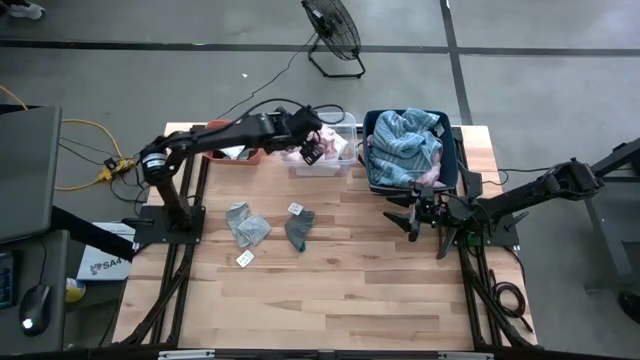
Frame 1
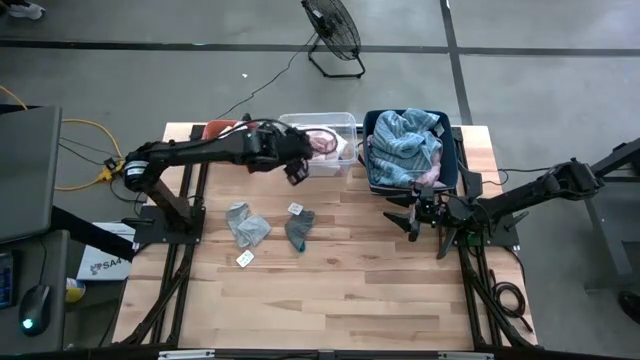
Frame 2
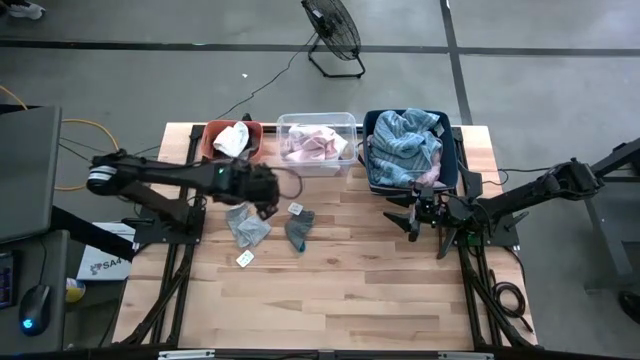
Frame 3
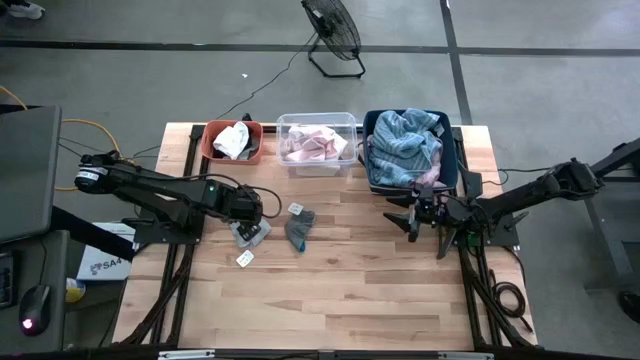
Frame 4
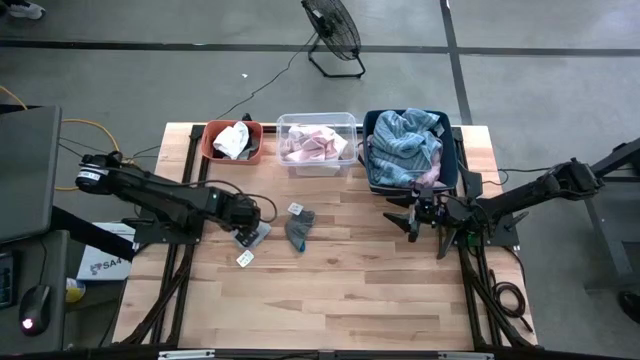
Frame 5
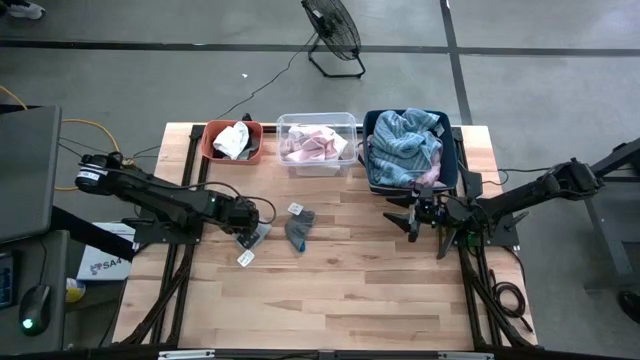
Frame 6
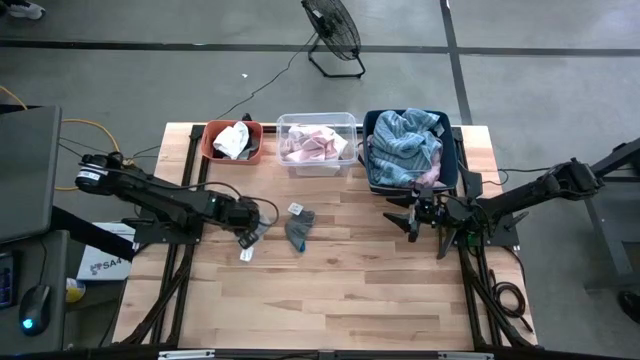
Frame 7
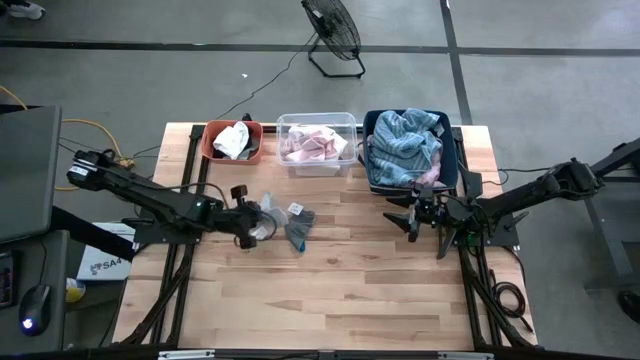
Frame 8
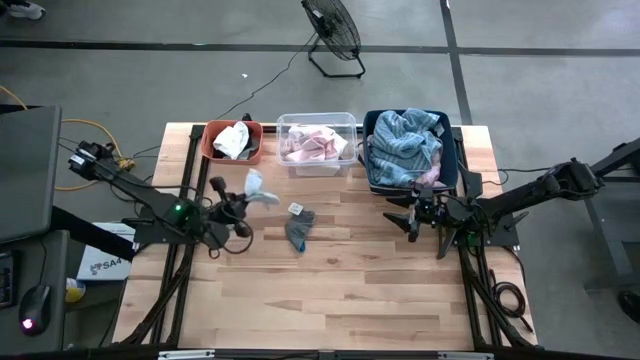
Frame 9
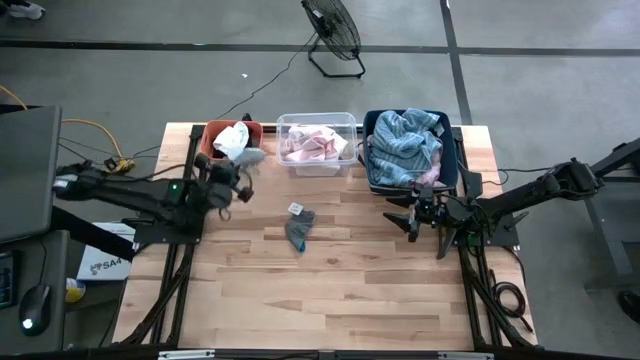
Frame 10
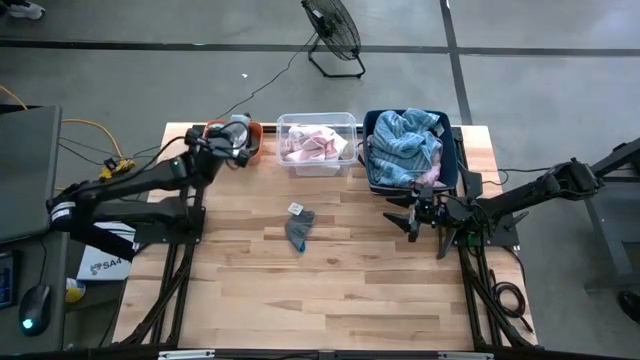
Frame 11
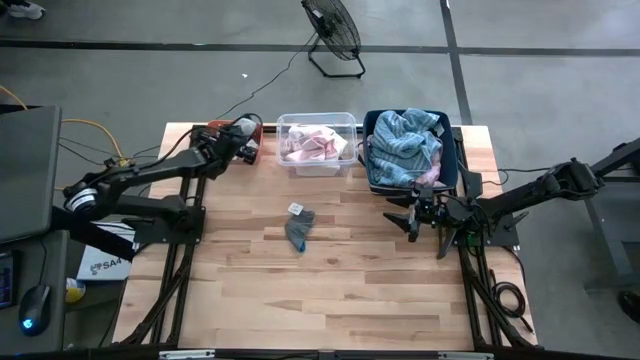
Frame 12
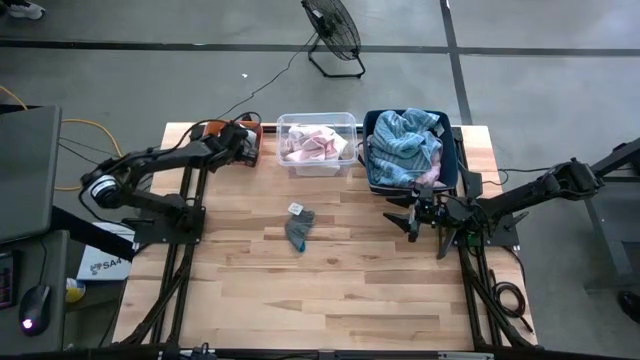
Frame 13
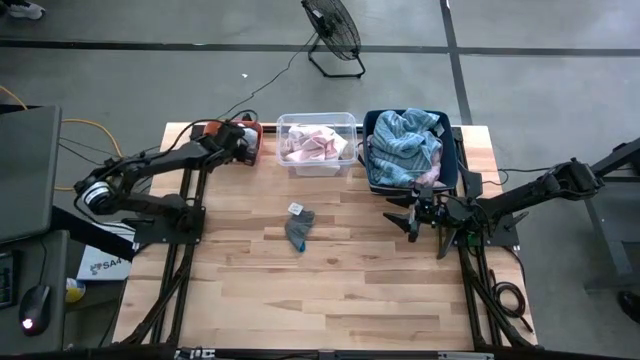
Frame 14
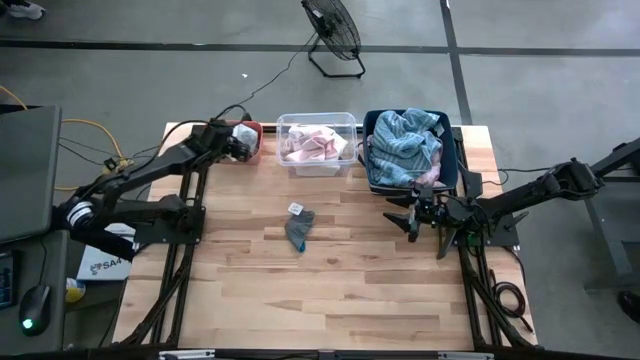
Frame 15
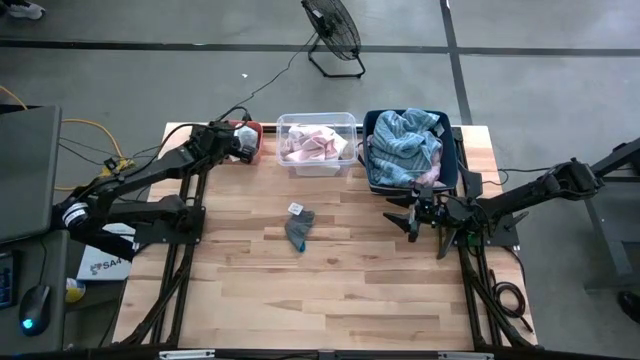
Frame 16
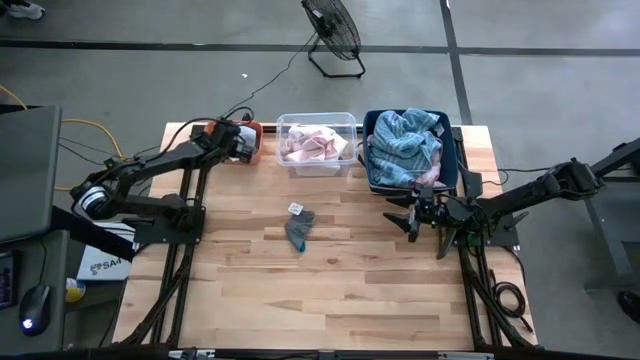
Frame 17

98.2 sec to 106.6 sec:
Task: Pick & Place Cloths
Put the light gray sock into the orange bin

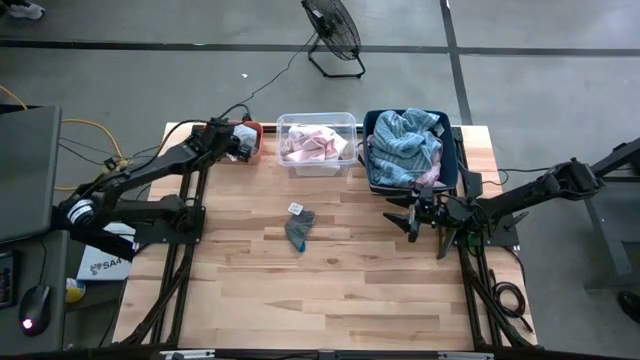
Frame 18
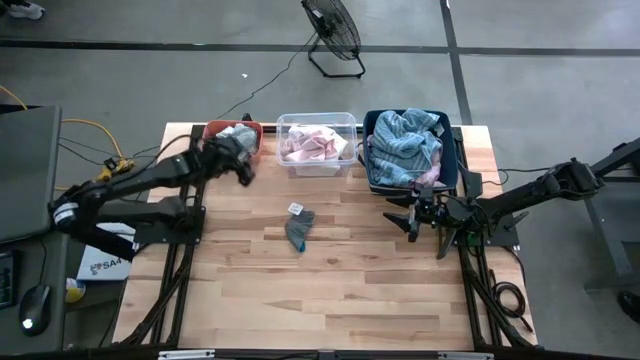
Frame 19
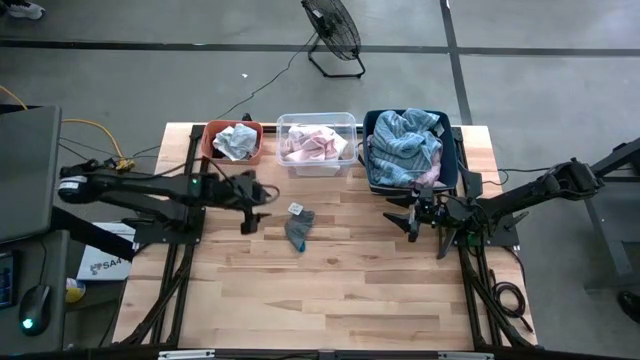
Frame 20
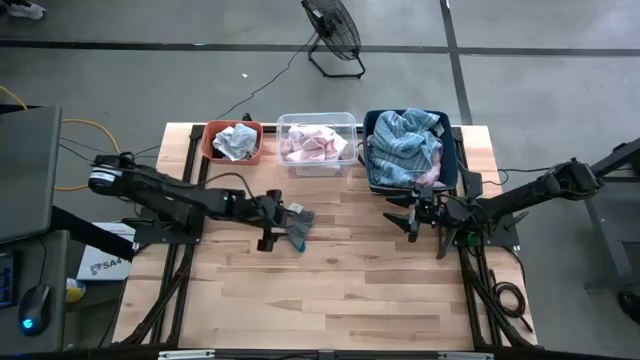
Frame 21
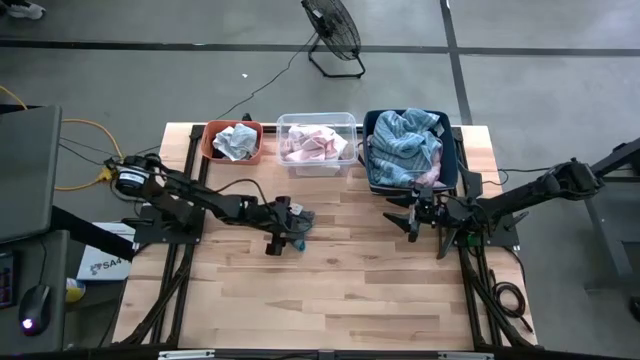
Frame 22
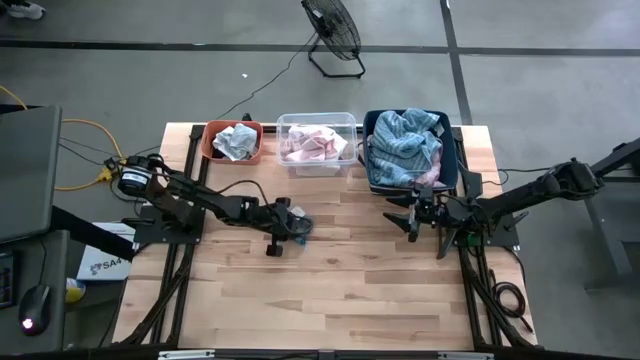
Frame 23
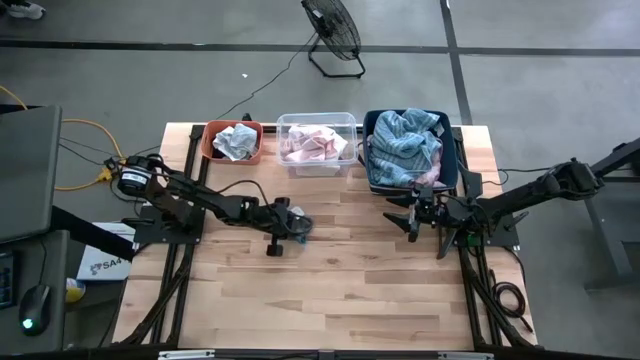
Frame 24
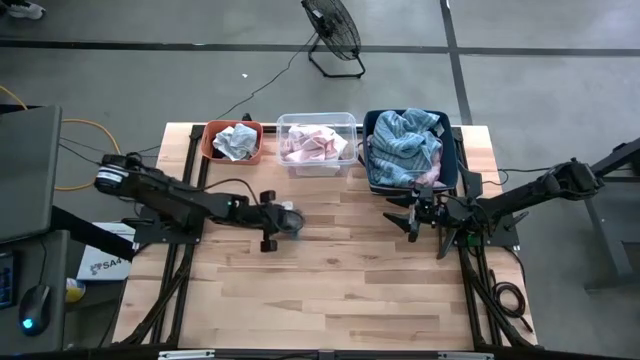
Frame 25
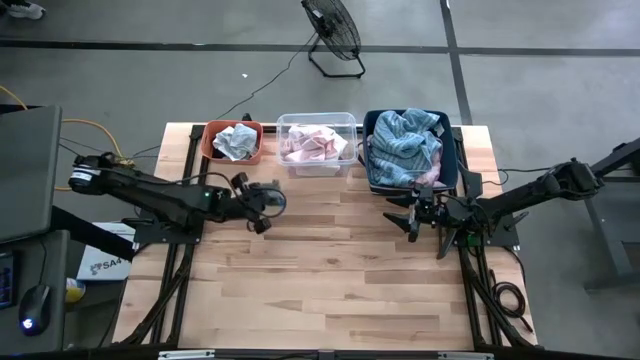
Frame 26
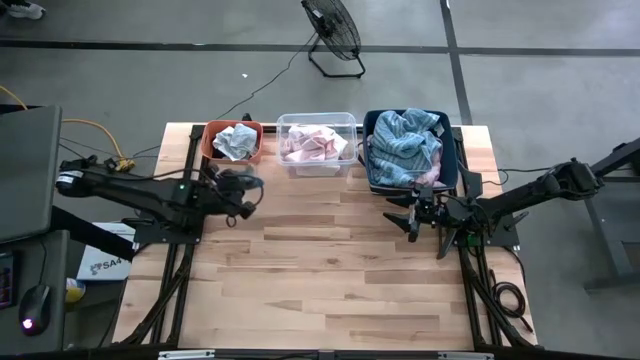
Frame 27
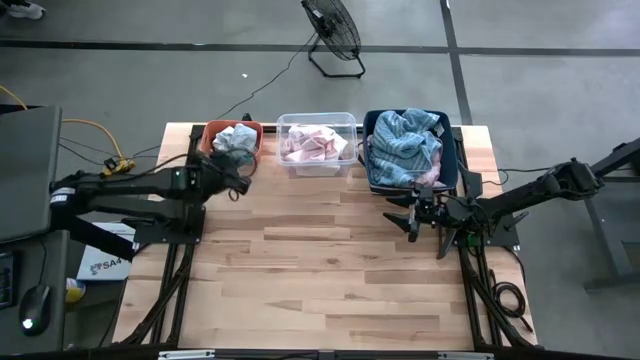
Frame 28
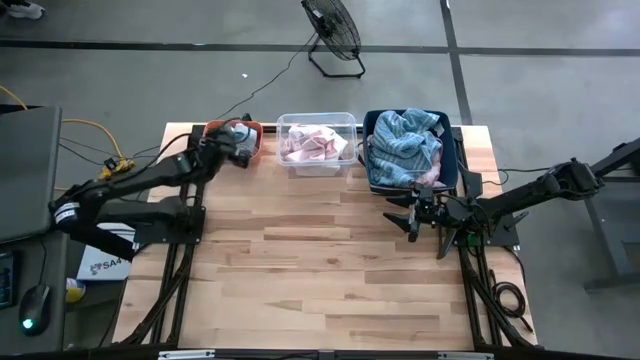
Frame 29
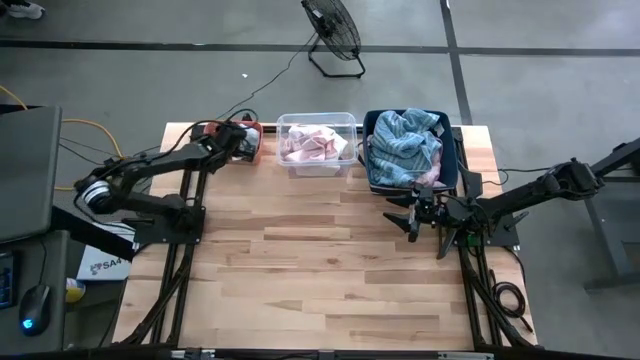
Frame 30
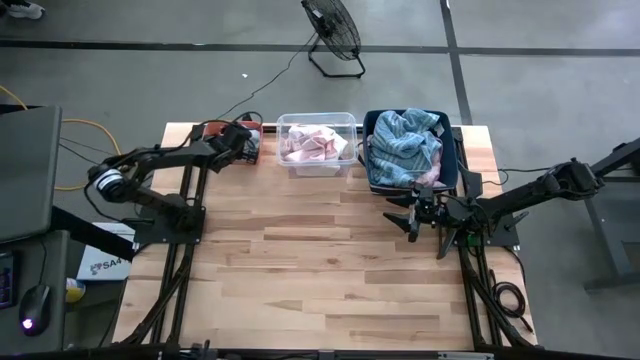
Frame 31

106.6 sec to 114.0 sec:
Put the gray sock into the orange bin

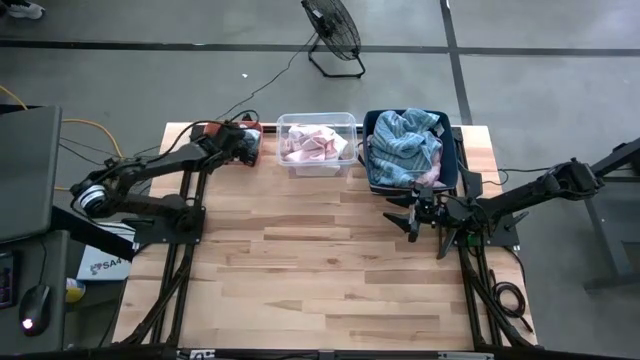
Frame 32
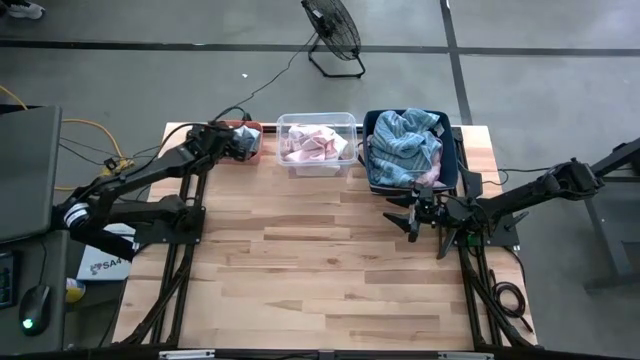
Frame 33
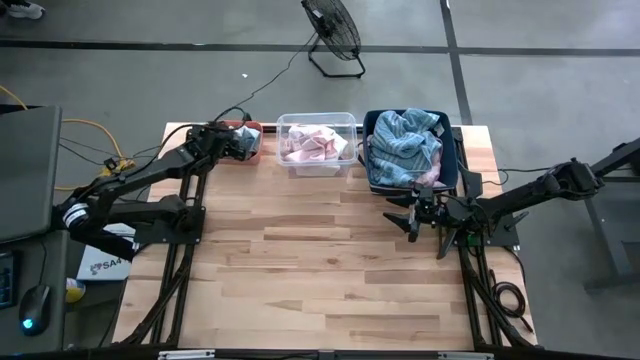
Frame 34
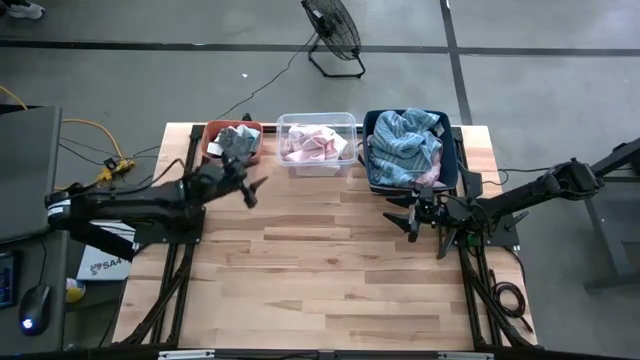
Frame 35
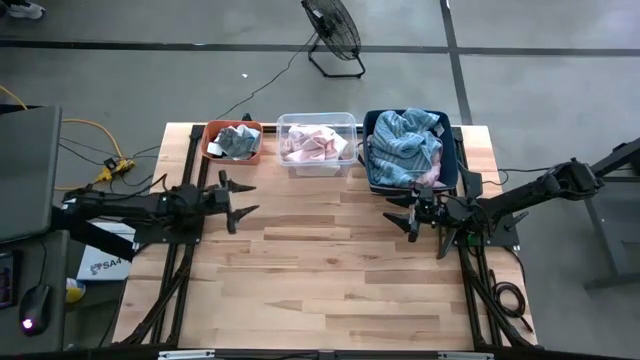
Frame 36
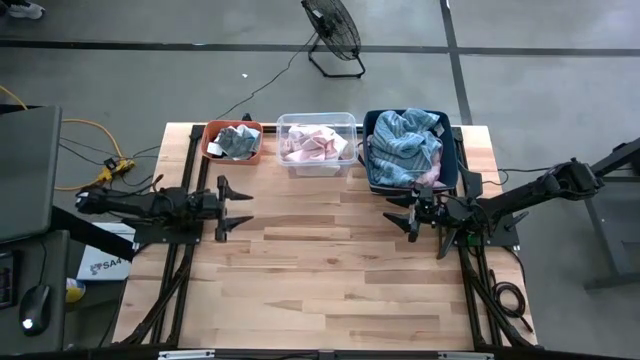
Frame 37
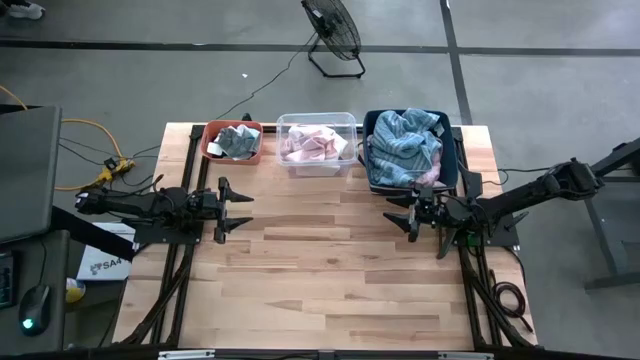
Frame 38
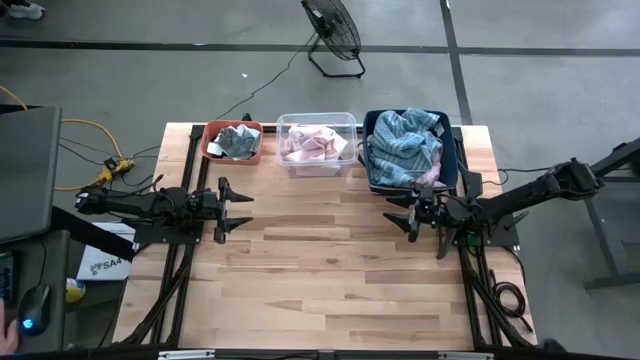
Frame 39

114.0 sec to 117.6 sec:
Return to Home Position

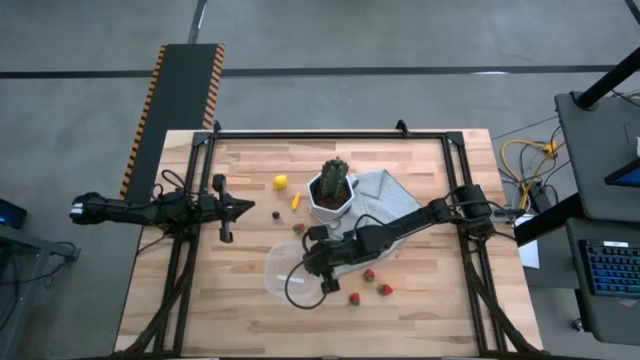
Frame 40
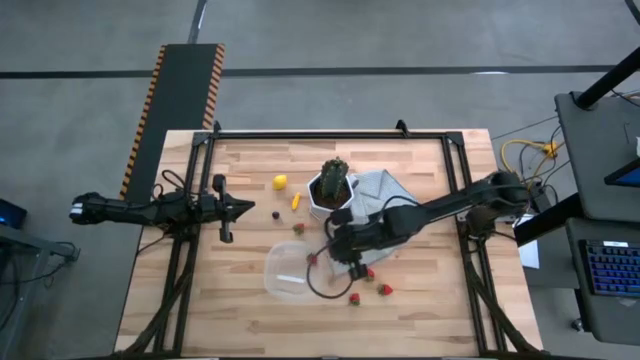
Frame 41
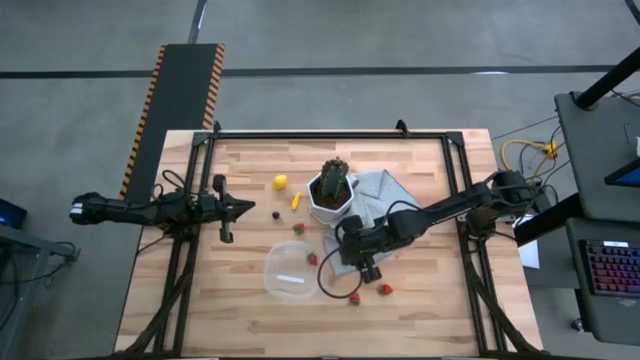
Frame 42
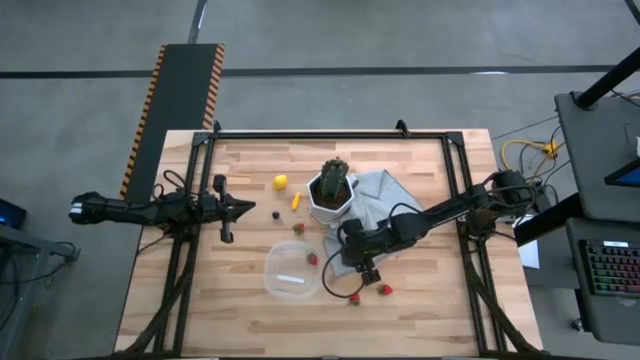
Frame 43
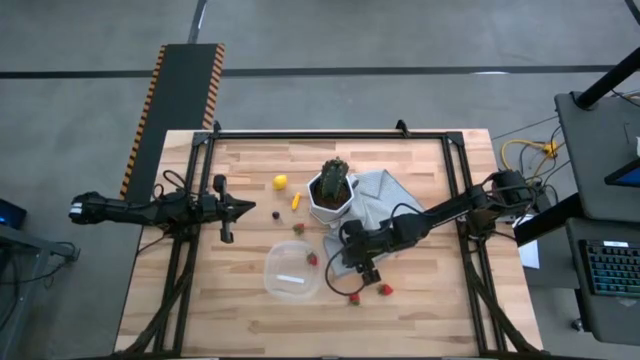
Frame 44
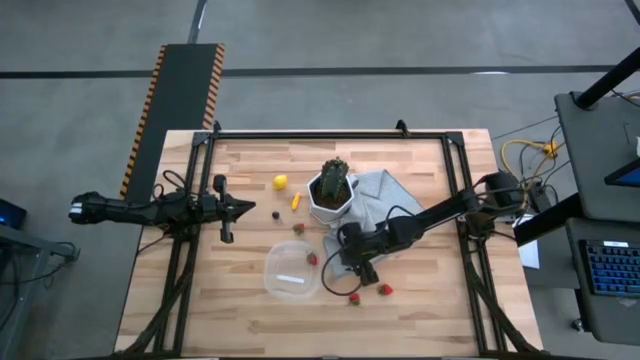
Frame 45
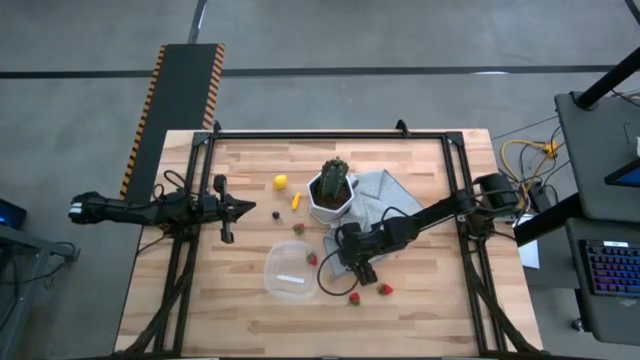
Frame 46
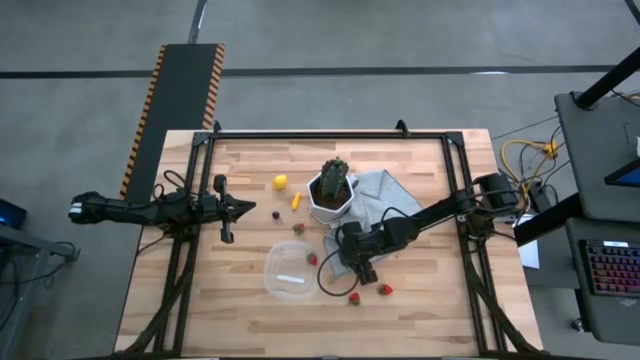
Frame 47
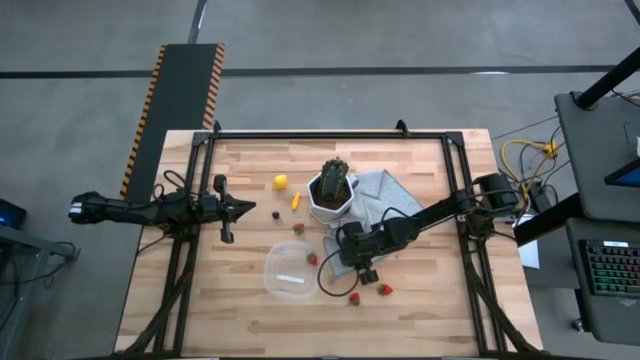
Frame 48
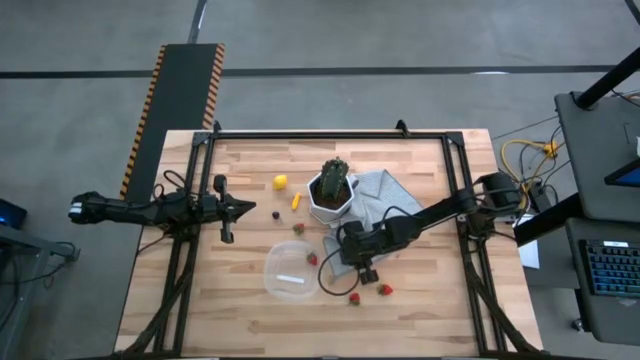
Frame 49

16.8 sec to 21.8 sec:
Task: Pick and placing Produce into tupperware
Put the blackberry into the transparent plastic container
